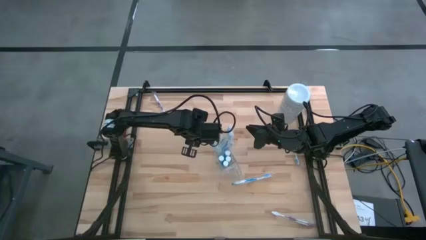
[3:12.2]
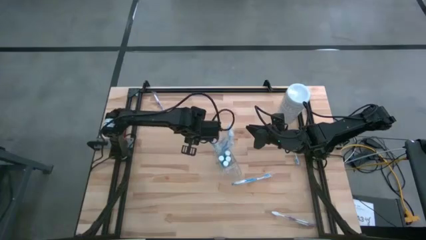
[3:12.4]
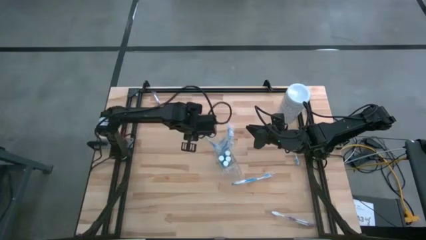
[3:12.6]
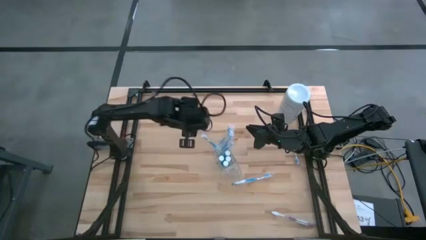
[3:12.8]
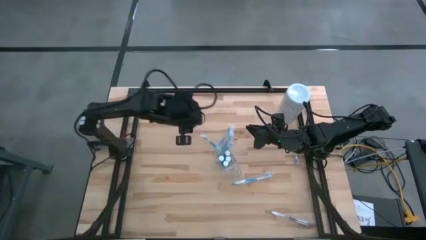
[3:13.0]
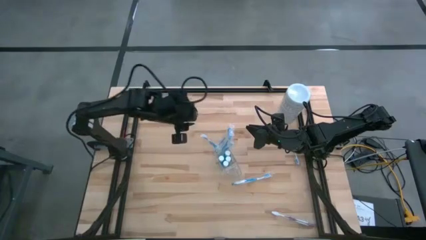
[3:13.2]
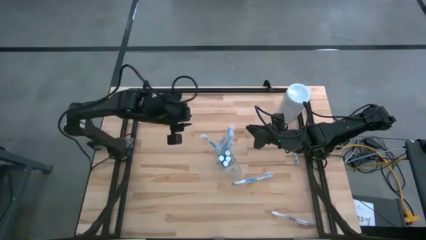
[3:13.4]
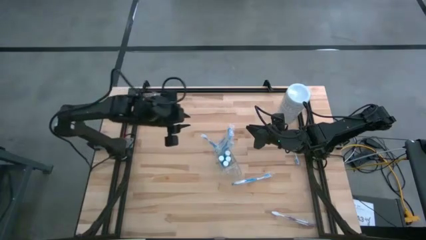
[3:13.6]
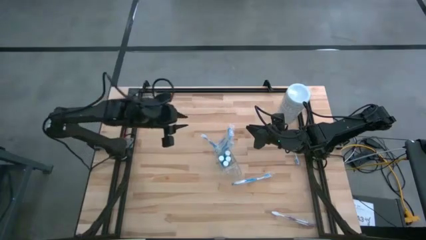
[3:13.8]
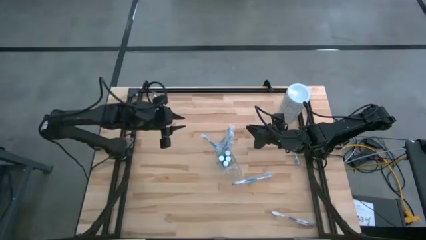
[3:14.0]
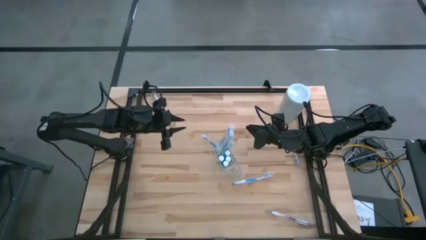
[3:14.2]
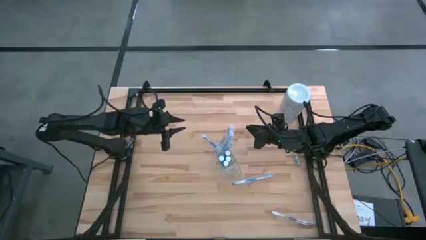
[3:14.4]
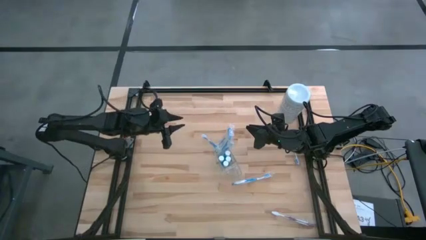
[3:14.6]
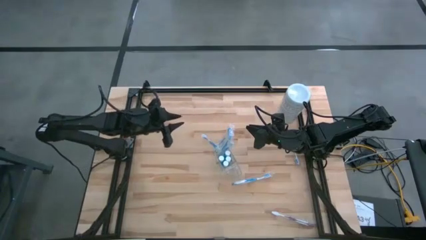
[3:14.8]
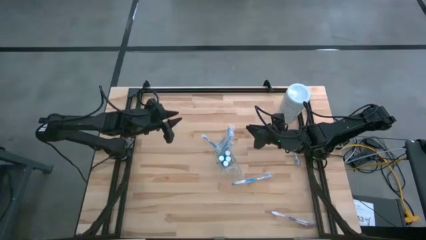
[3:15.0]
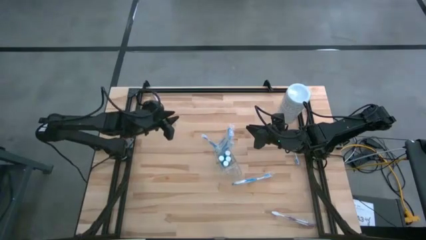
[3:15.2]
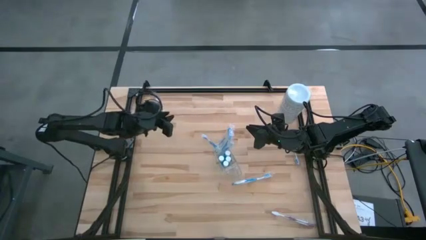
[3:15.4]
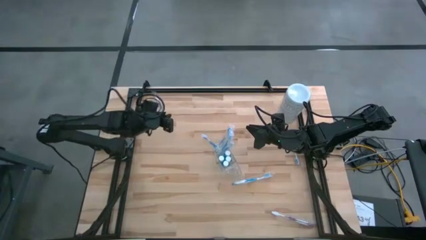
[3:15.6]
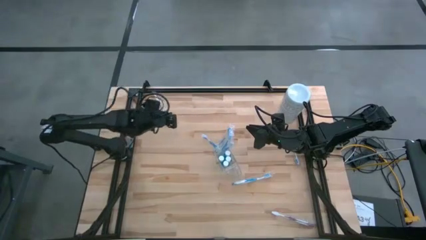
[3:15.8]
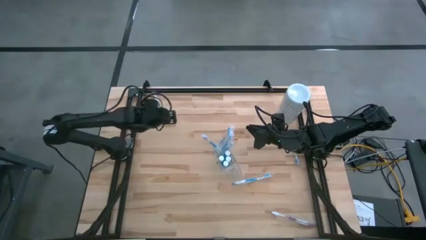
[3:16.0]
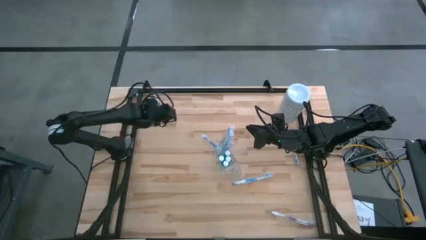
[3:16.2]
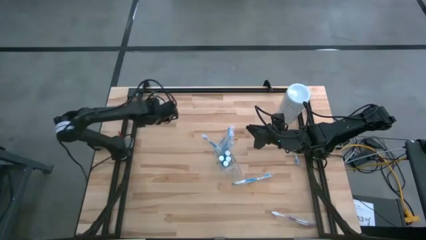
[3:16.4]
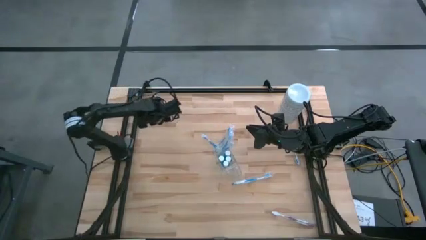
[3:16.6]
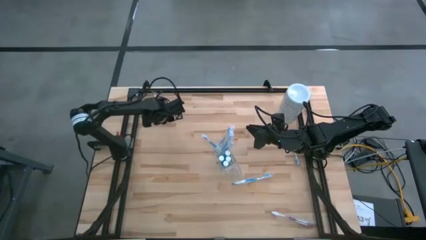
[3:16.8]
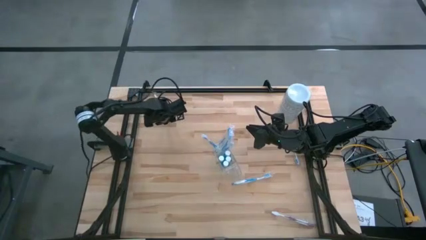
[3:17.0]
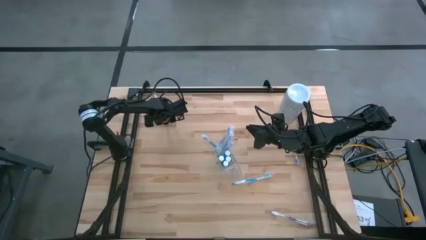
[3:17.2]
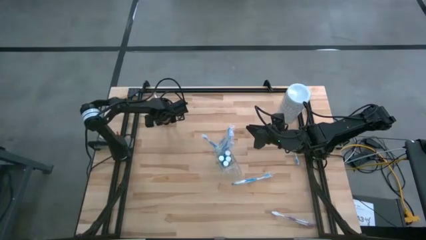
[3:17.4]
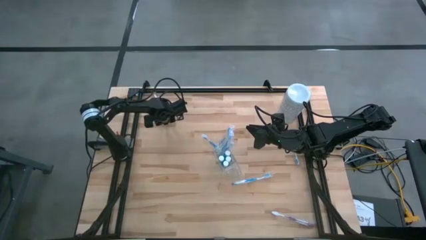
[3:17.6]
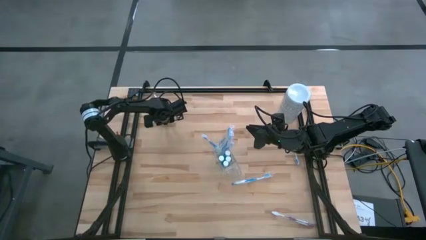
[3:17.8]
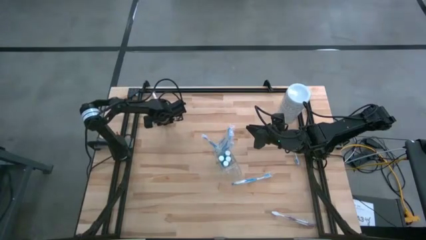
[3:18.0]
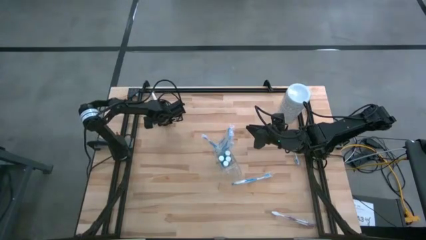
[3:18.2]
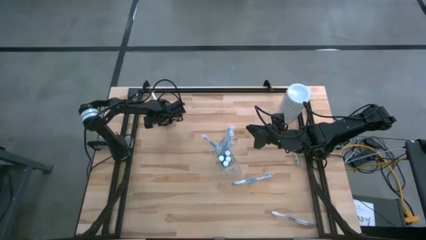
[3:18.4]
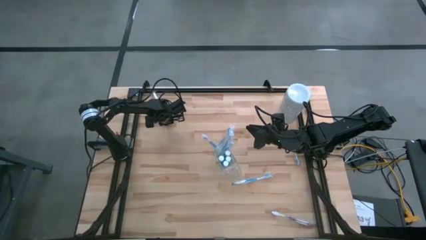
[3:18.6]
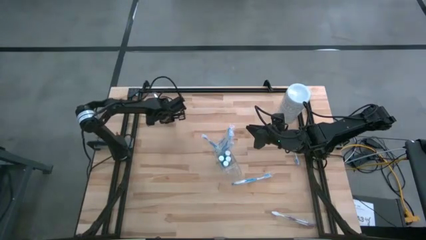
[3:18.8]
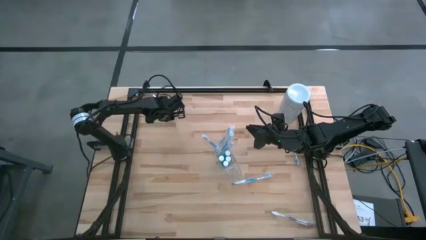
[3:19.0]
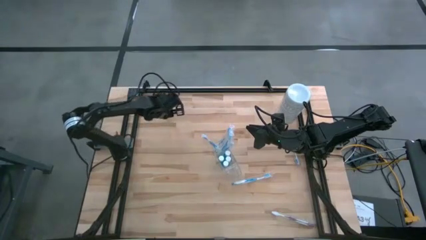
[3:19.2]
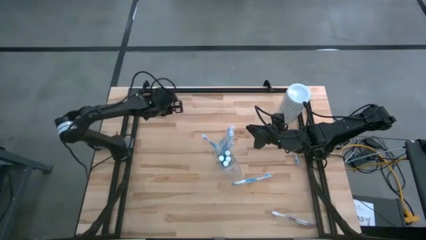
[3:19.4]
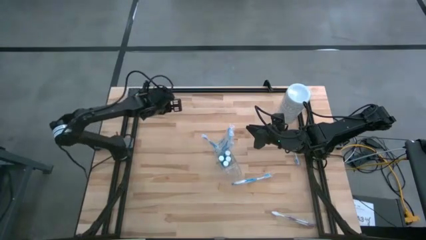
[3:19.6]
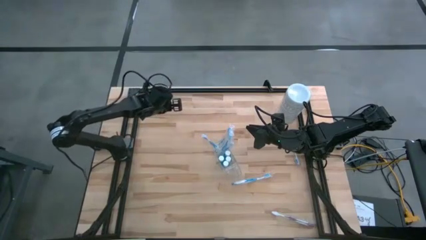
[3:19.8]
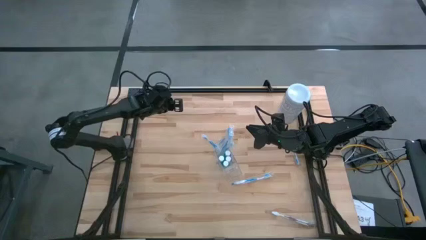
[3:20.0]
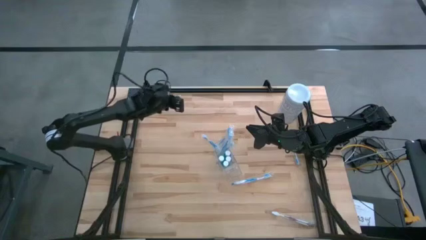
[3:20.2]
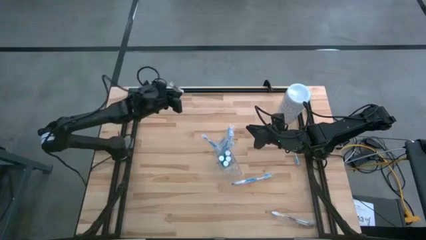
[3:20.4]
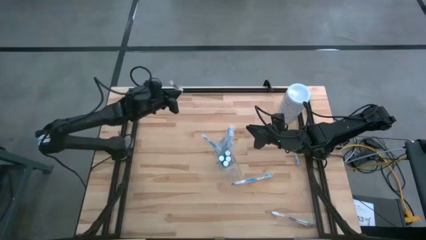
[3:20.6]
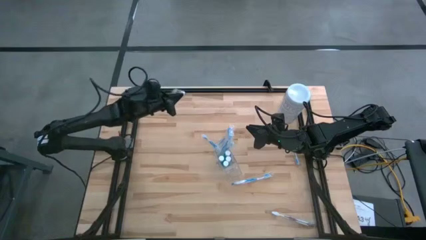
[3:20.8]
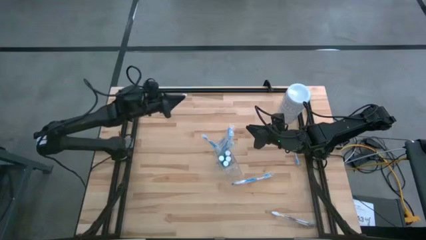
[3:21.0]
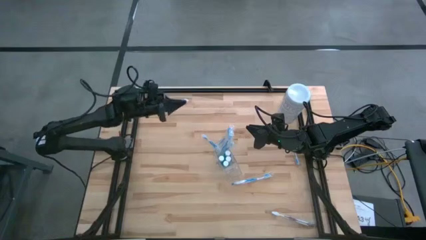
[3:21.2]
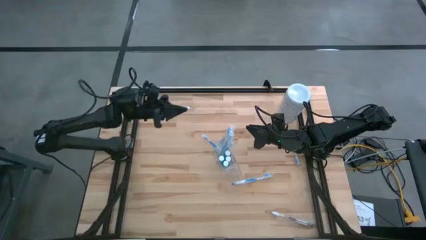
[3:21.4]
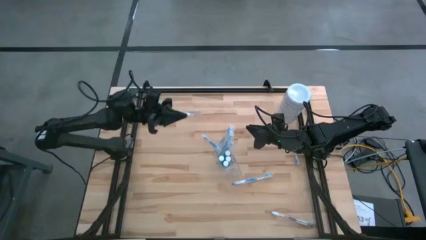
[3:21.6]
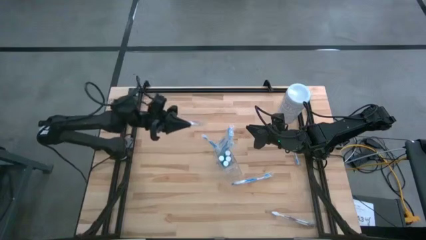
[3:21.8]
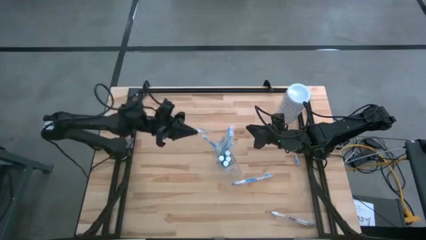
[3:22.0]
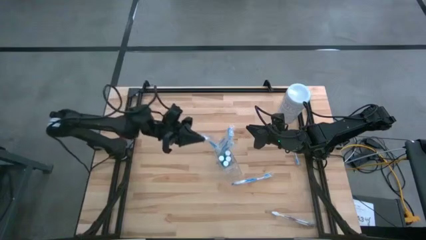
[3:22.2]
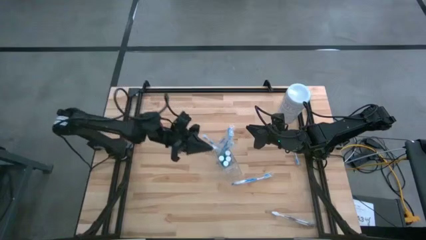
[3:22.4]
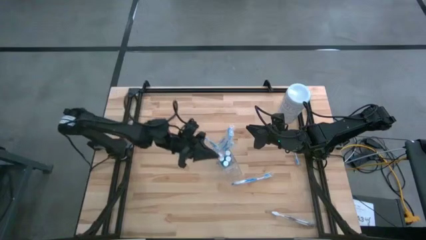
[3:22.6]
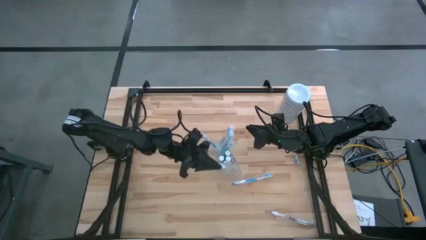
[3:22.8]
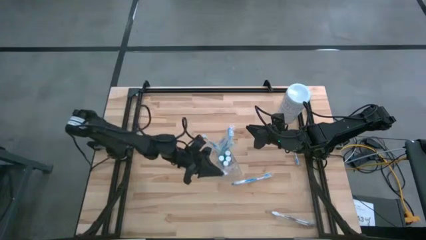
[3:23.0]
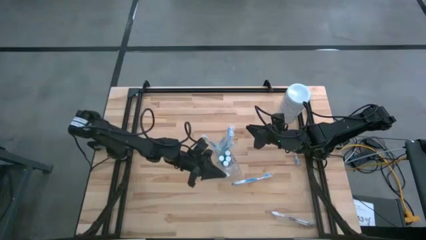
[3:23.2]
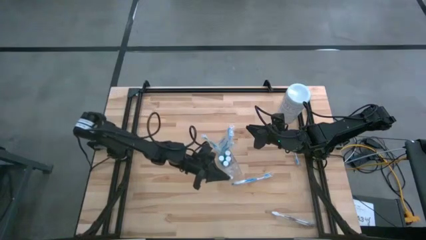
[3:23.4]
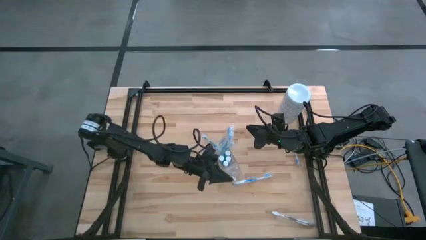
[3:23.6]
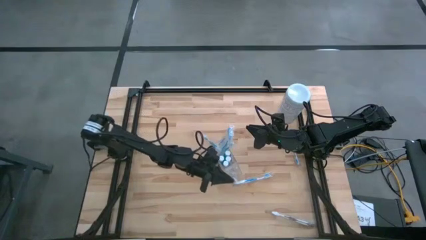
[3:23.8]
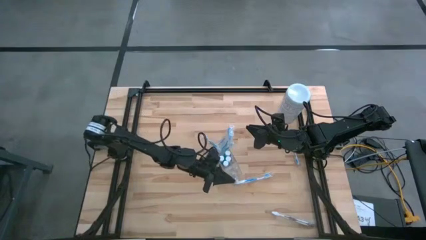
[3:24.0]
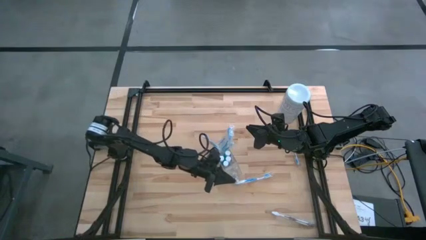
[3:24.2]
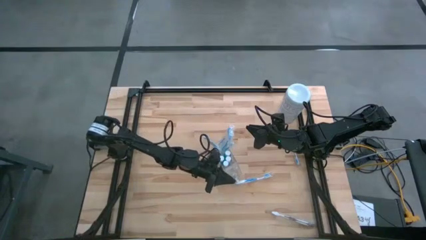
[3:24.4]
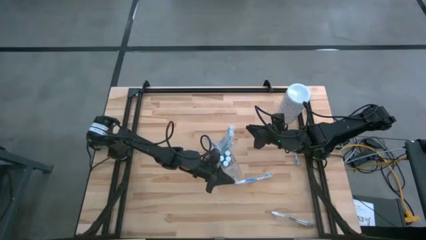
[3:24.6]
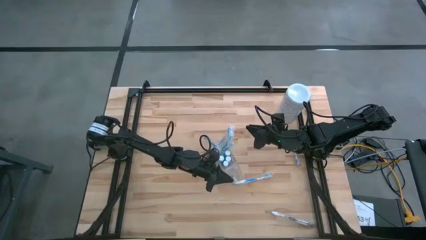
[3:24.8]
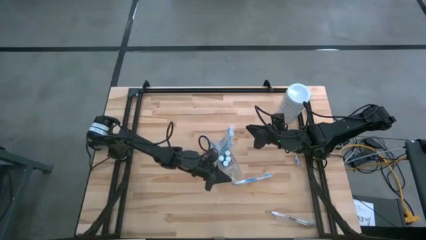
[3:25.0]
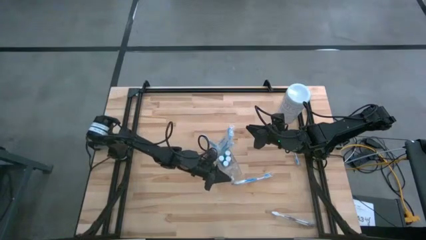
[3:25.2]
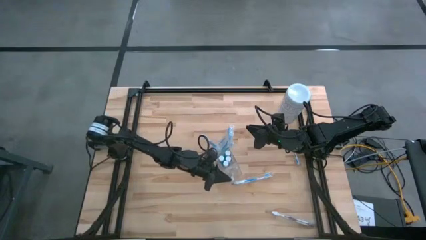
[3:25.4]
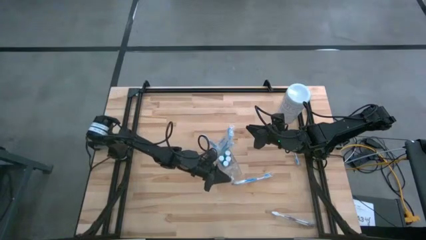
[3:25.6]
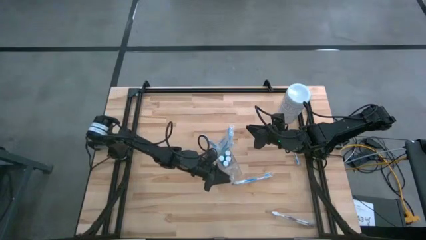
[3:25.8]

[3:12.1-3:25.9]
Task: Pick & Place toothbrushing station
Put the purple toothbrush into the right section of the transparent organizer
